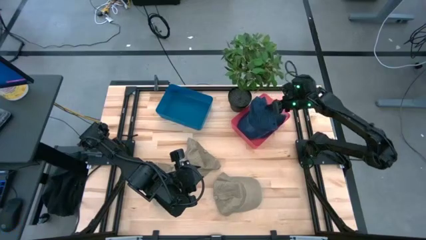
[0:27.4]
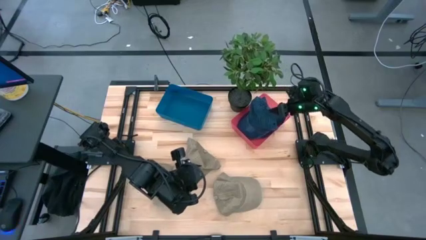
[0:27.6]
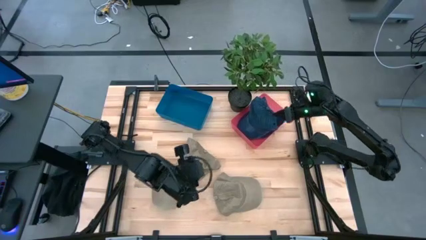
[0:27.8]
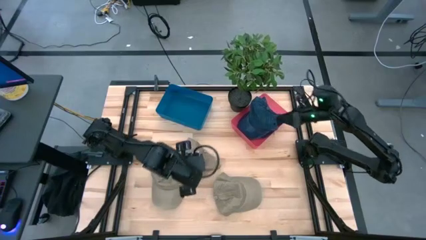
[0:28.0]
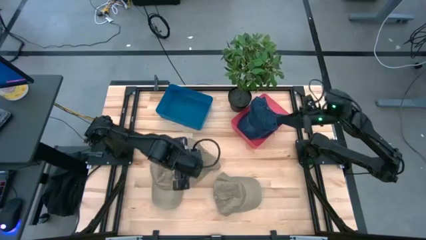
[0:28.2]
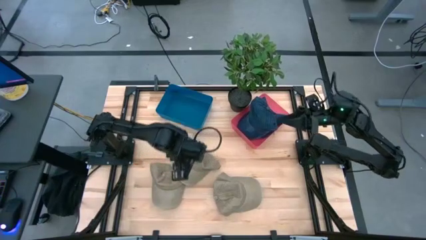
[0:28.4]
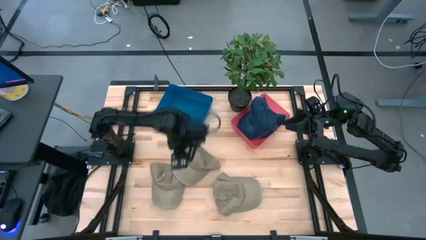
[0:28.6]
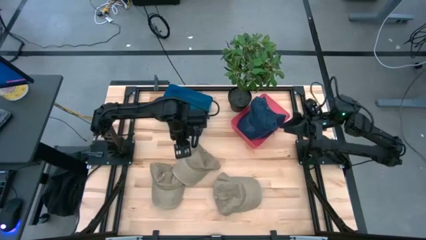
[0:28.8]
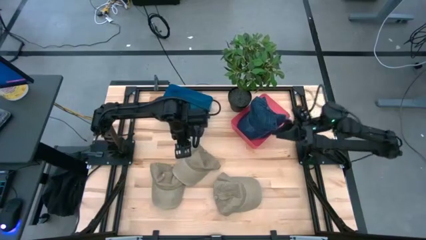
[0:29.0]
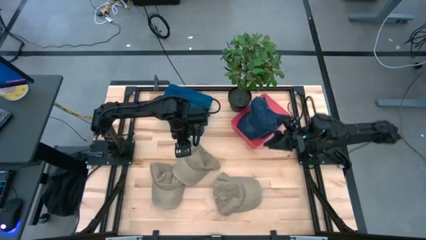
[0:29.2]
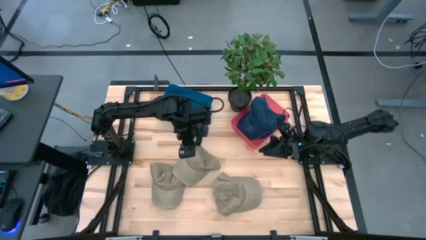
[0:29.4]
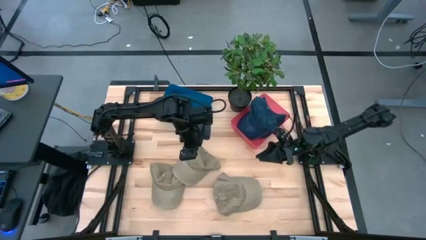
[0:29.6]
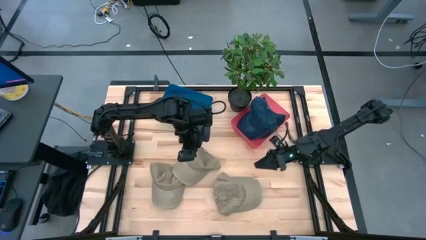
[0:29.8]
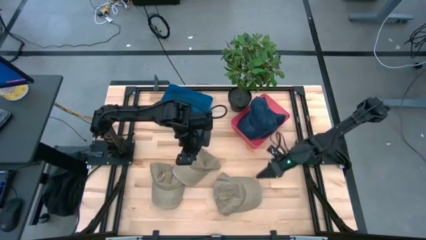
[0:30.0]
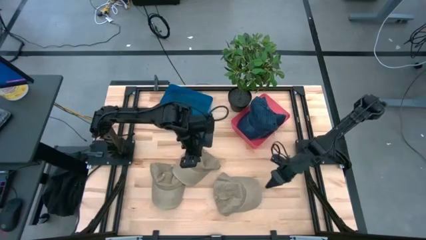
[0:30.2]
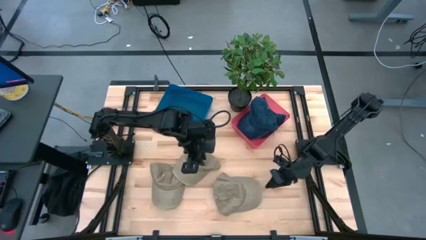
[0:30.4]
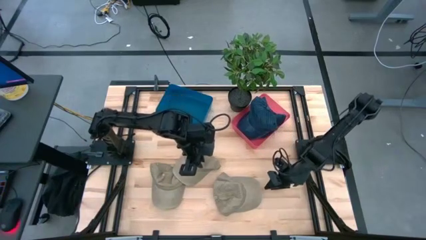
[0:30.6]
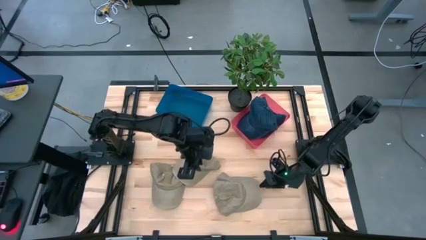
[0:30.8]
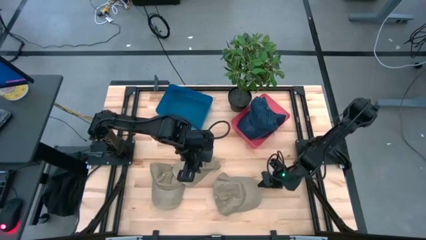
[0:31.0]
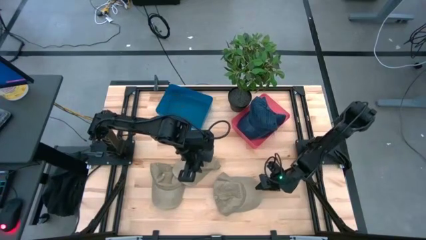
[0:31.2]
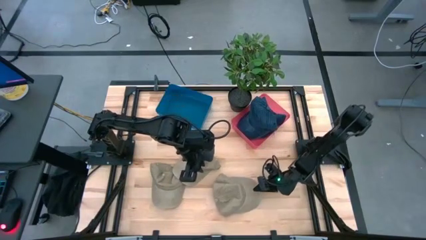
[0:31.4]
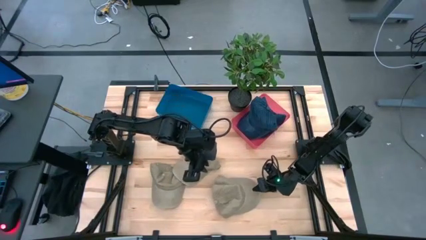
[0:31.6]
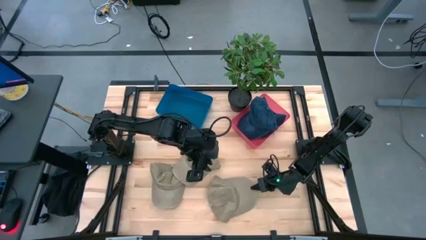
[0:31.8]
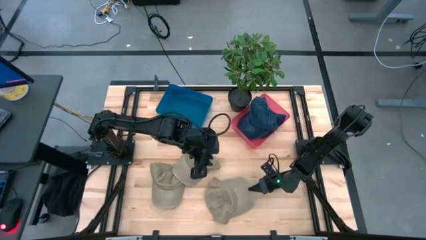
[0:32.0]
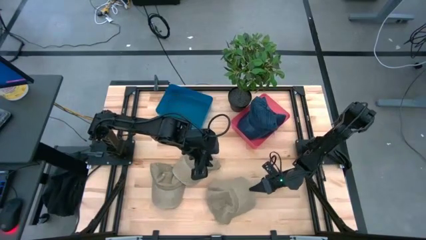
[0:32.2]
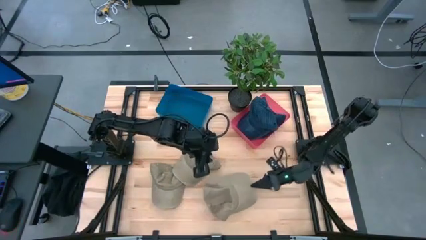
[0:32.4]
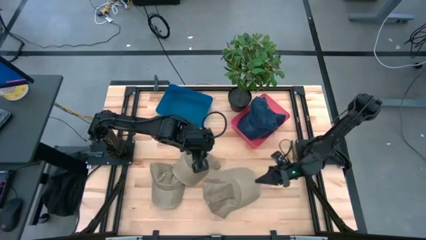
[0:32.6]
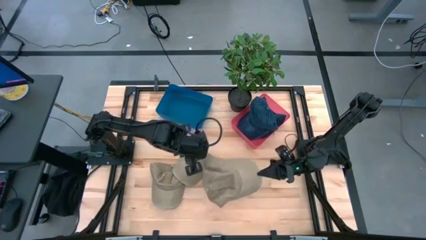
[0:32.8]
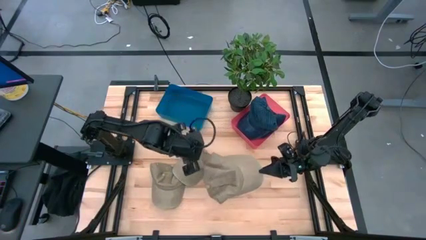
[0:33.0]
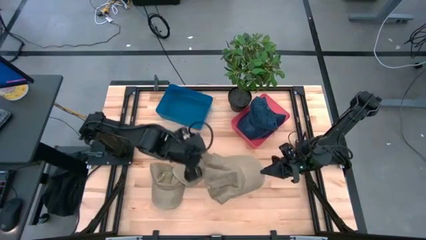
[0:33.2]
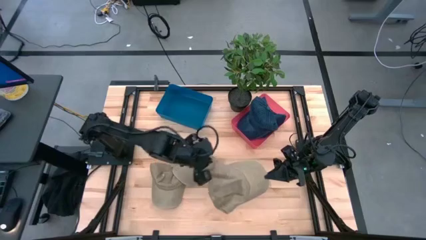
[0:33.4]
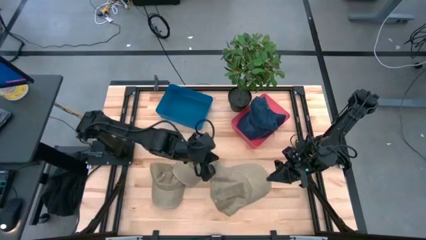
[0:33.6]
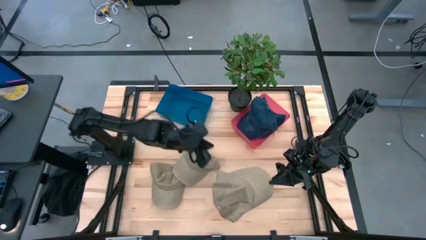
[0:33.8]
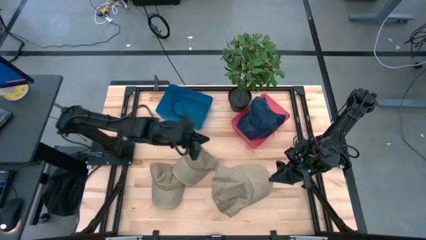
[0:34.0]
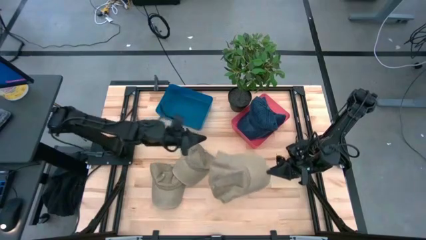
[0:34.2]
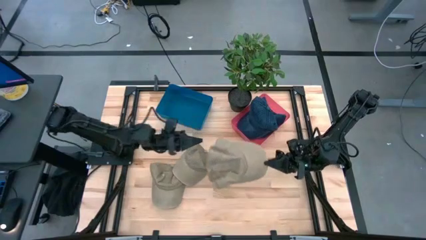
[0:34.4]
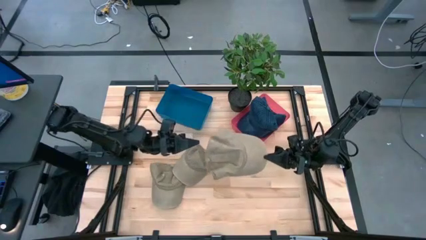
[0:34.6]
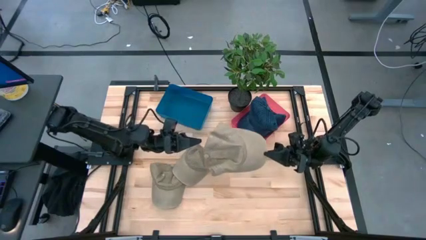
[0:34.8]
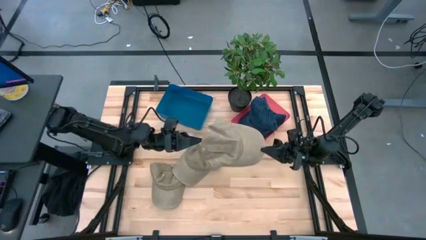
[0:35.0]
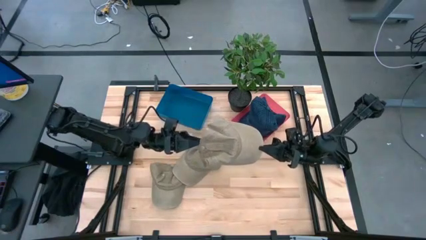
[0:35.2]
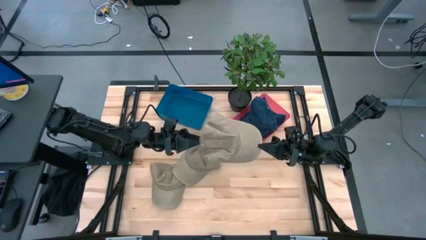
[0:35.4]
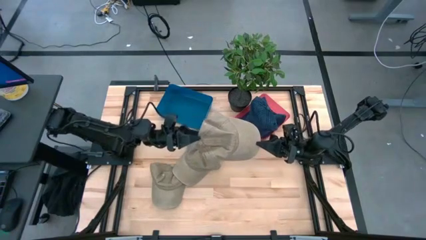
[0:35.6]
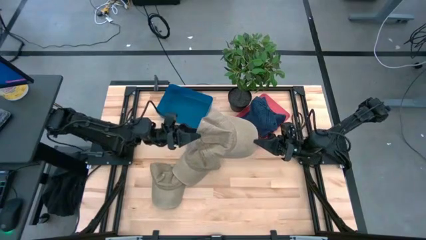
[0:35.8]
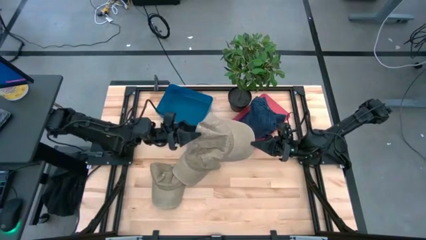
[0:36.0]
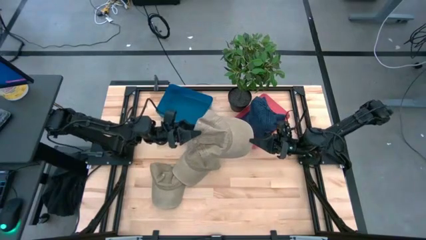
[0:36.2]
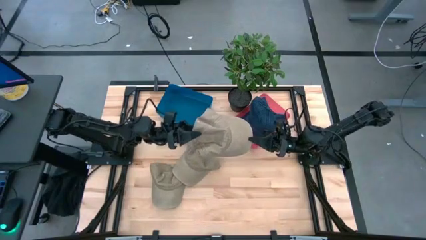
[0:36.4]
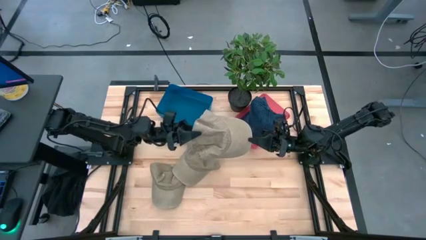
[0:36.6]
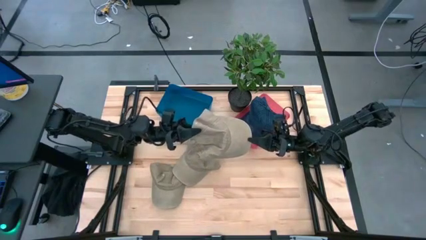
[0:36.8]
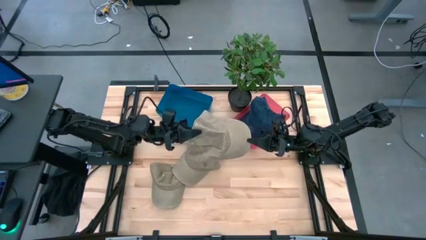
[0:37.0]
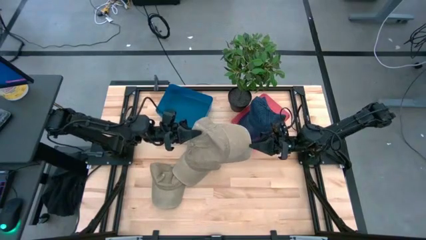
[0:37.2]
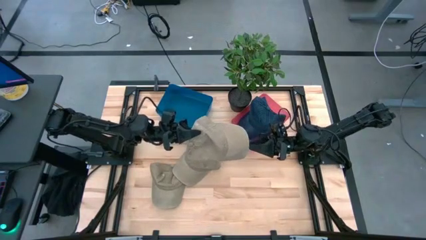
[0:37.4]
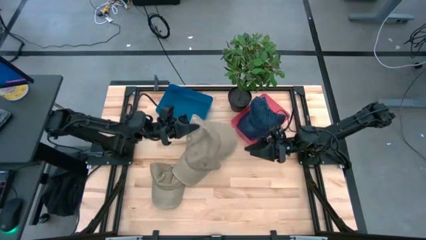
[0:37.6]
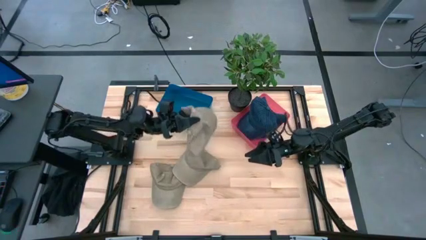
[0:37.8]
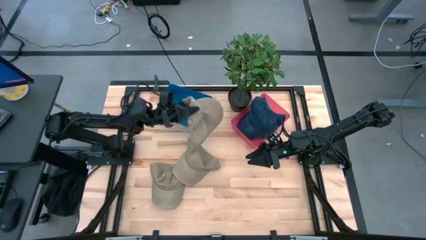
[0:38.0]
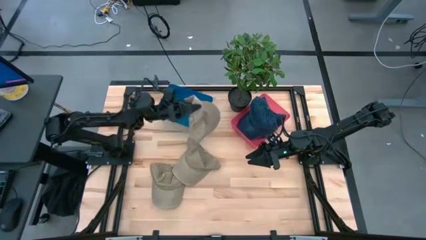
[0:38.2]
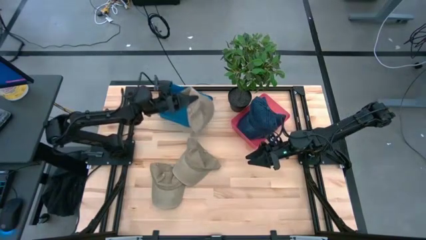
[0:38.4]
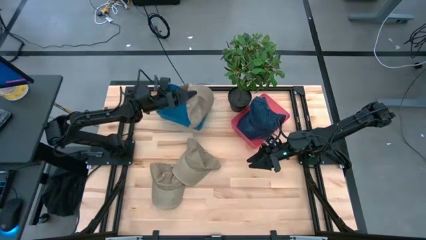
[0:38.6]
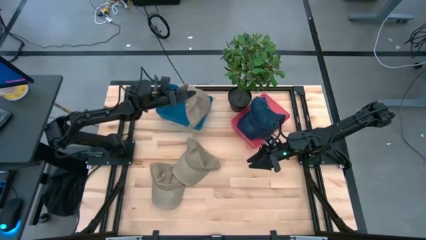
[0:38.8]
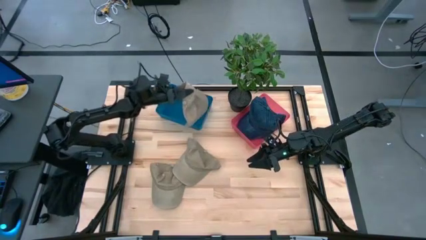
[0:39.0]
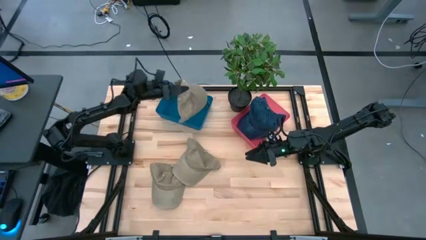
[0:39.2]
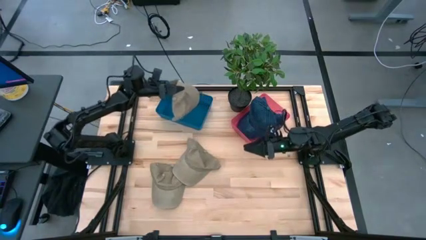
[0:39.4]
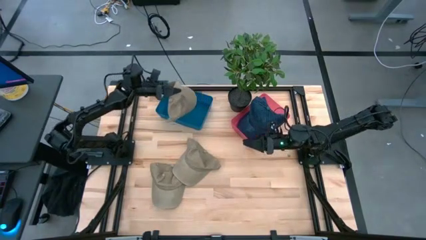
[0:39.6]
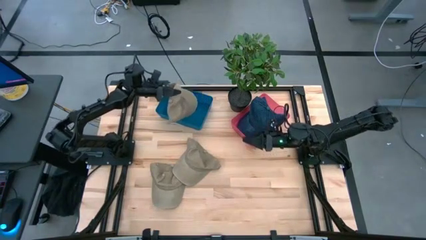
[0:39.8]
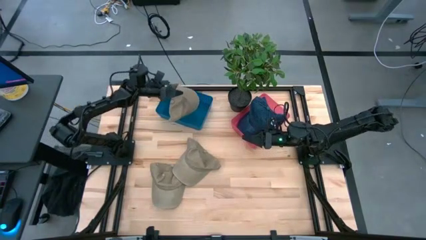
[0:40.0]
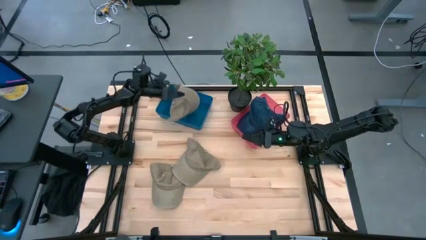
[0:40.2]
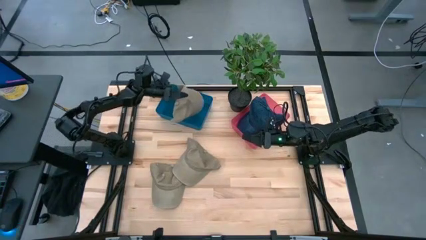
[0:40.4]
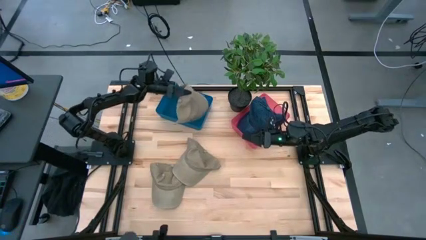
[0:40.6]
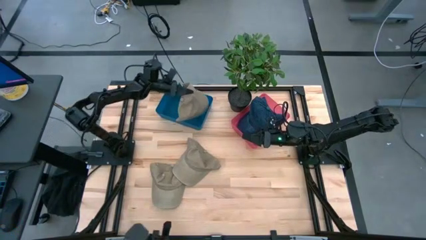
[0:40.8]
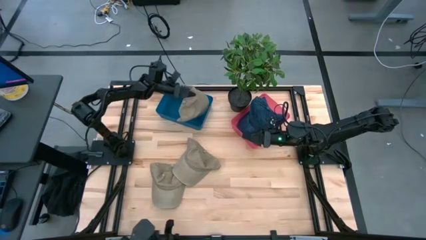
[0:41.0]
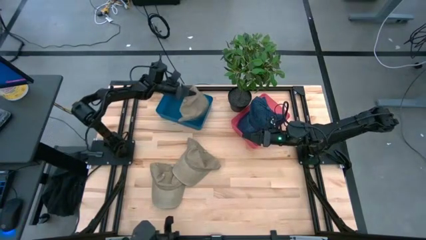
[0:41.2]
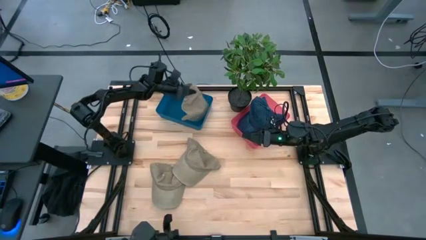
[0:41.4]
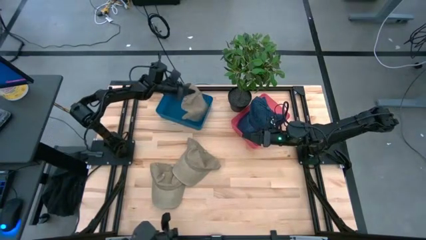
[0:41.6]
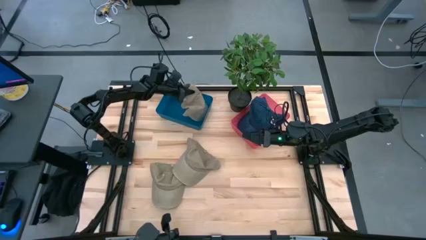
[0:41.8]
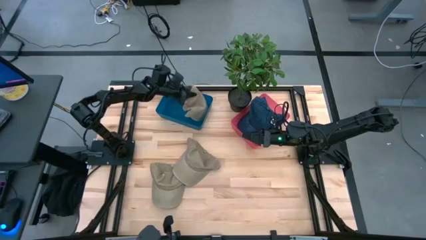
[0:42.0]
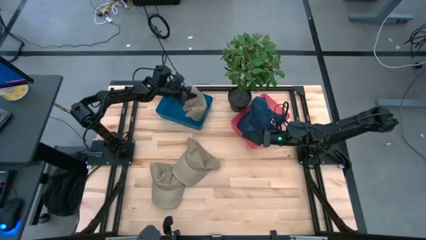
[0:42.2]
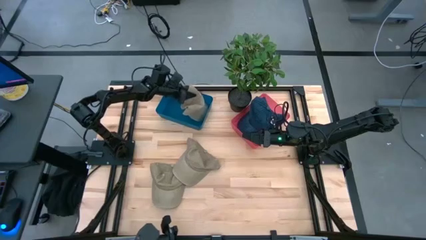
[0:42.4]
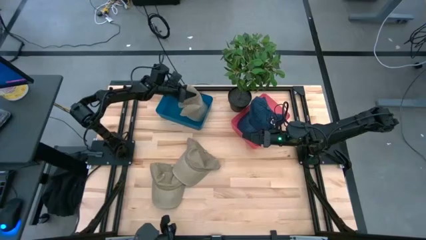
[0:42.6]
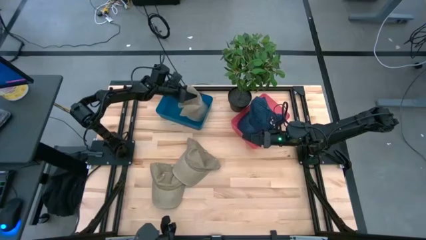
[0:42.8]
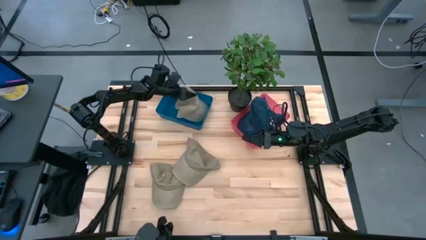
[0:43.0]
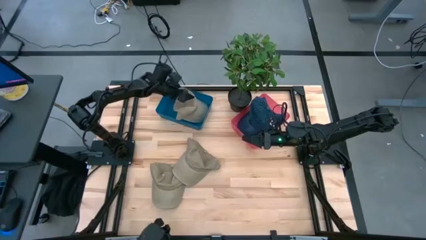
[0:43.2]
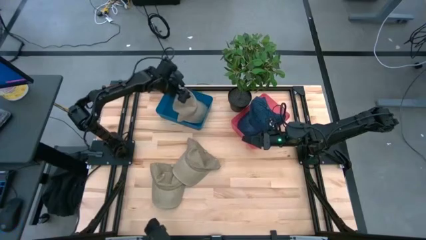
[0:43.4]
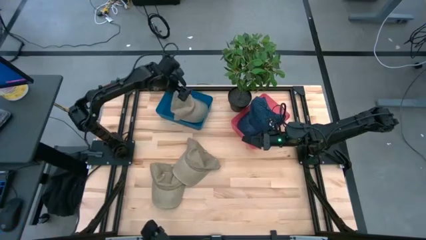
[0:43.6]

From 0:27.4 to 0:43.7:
Task: Pick & Place hat
Put the bottom right brown cap into the blue bin
